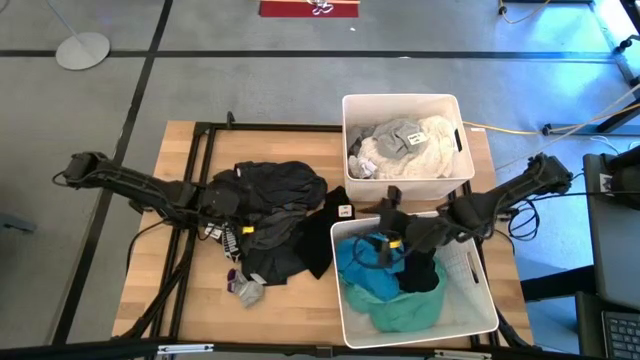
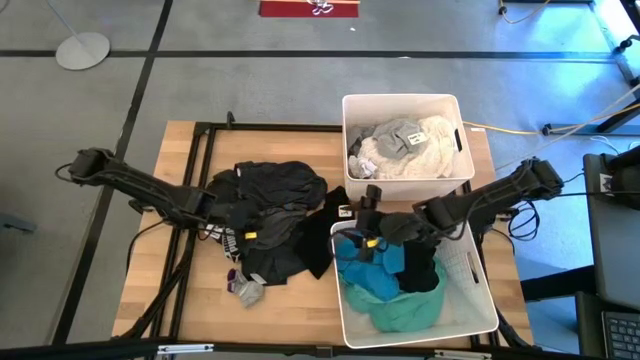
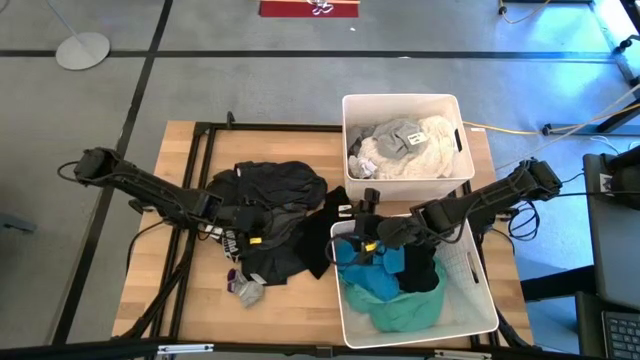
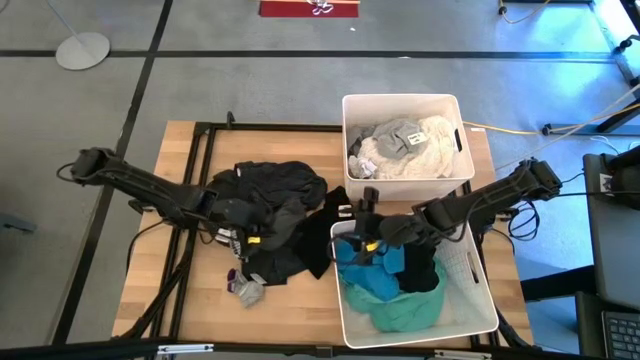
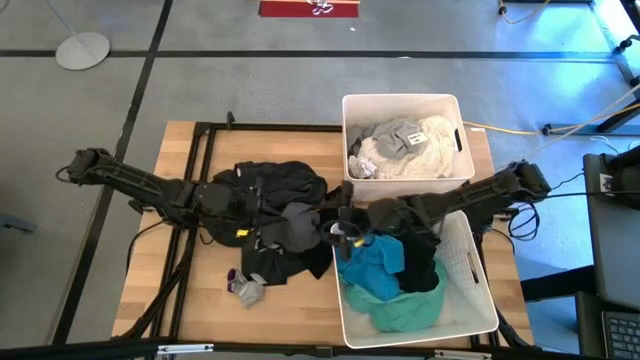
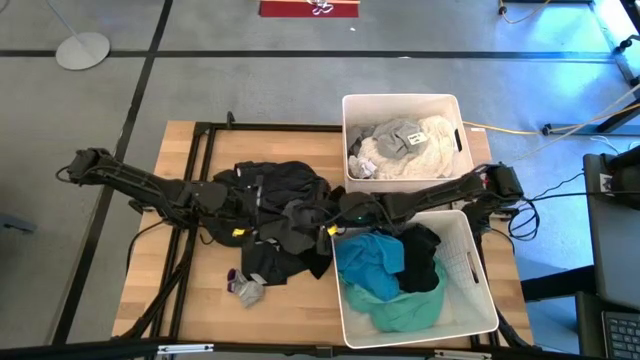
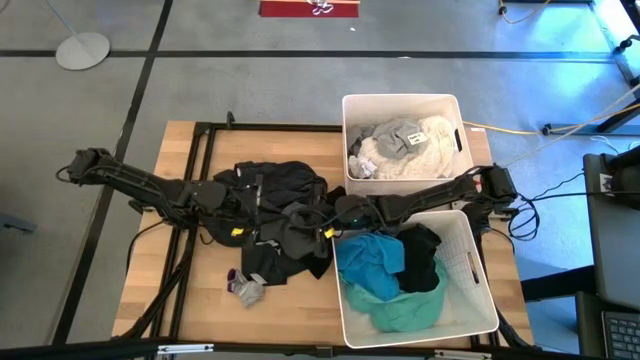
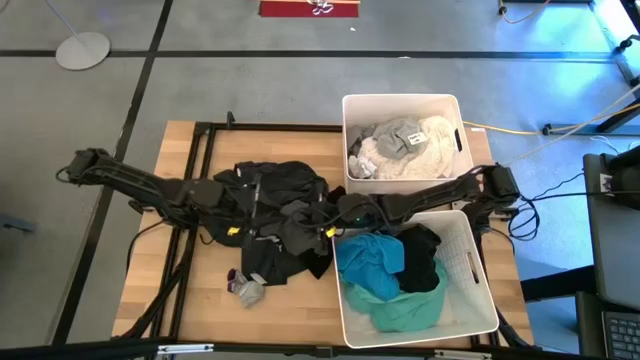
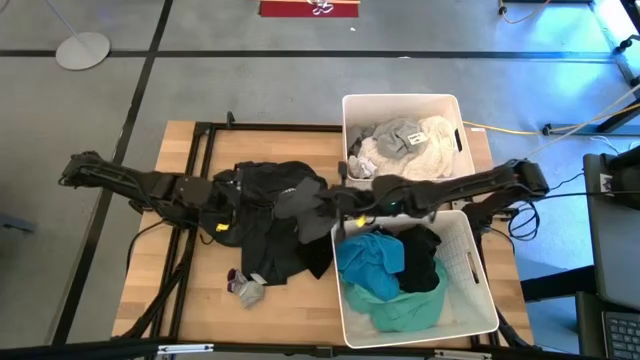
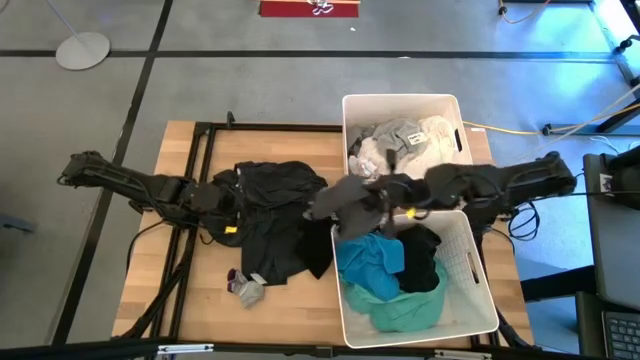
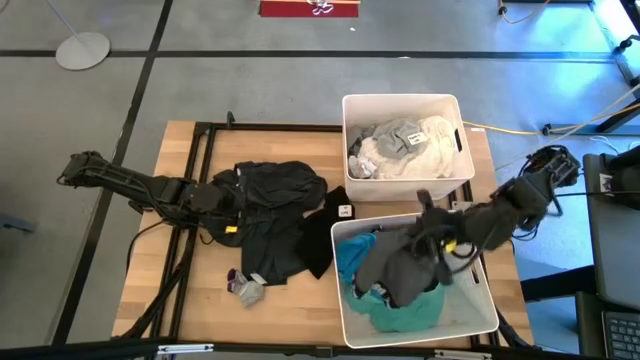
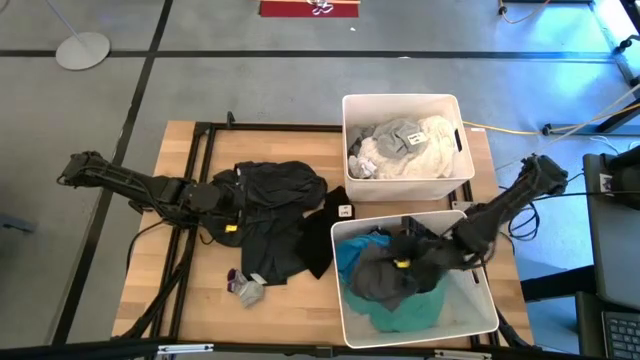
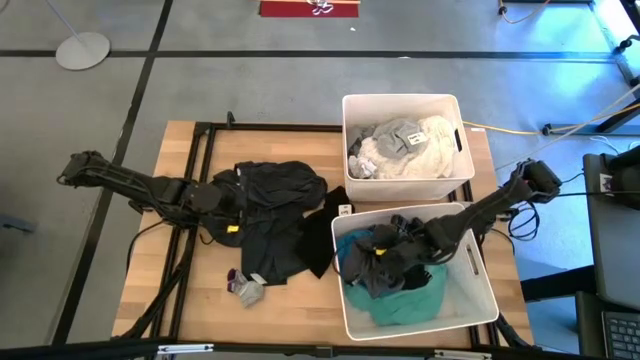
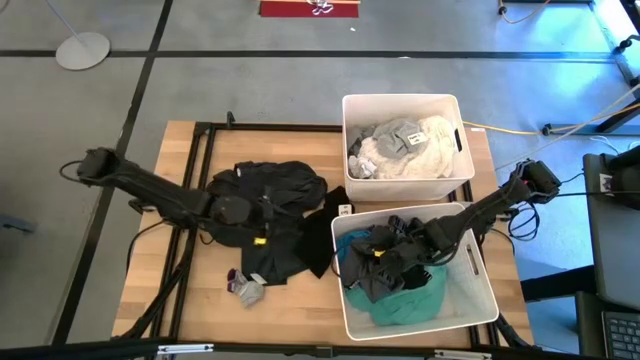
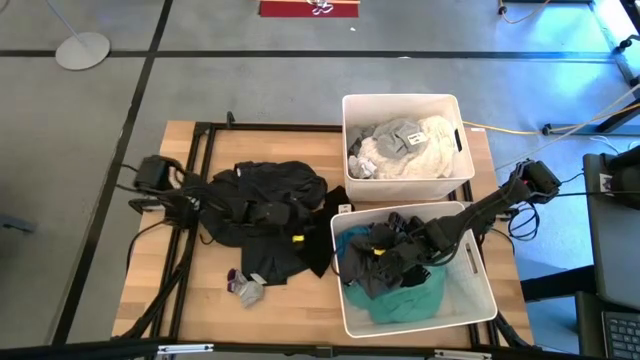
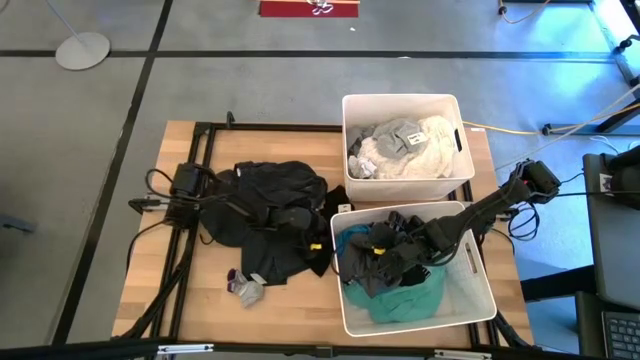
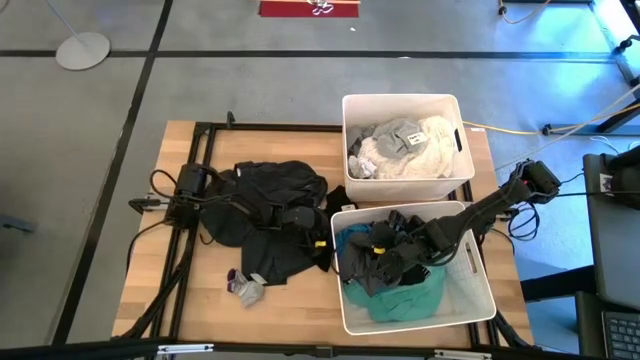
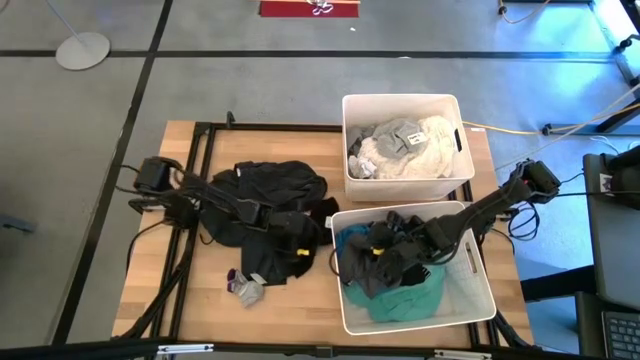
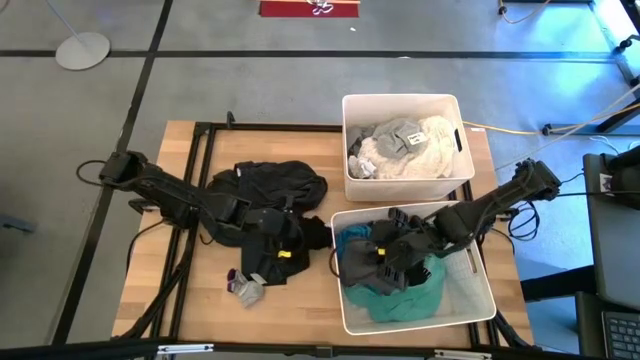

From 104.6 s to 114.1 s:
Task: Sort clothes
Put the gray underwear into the bottom white laundry bin

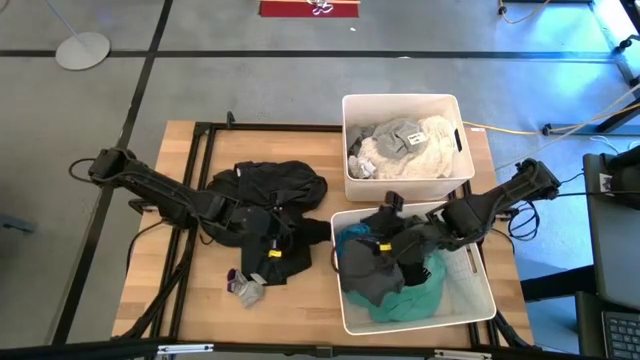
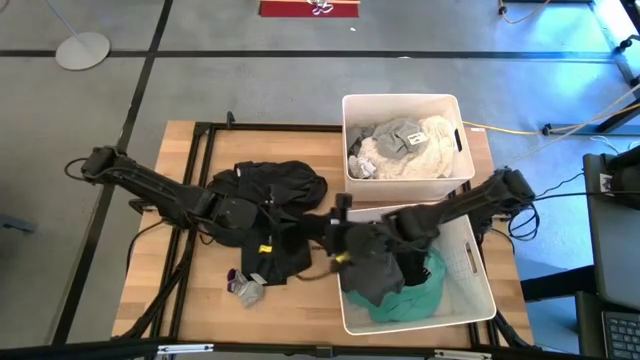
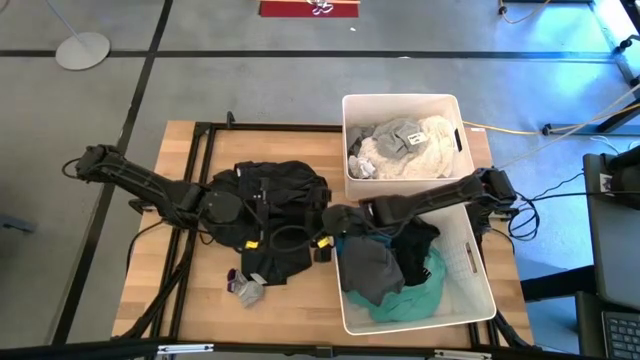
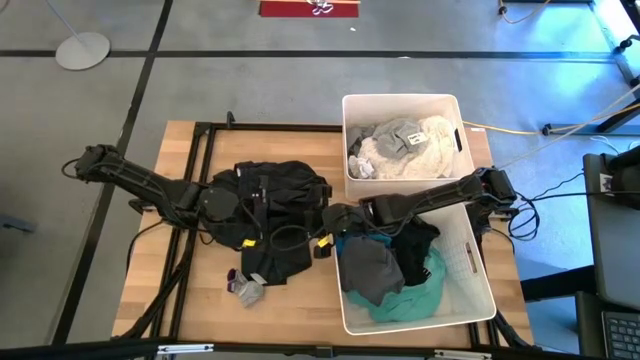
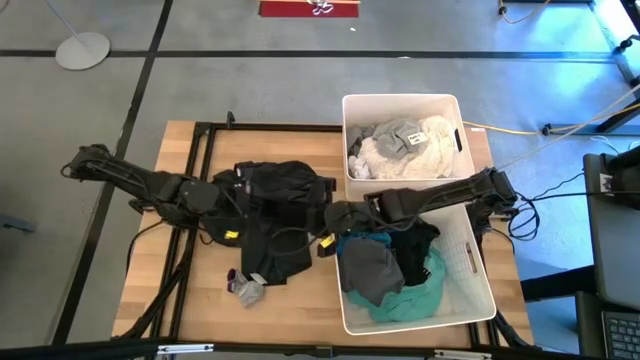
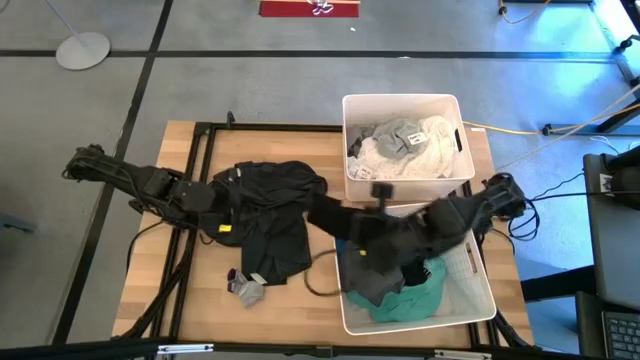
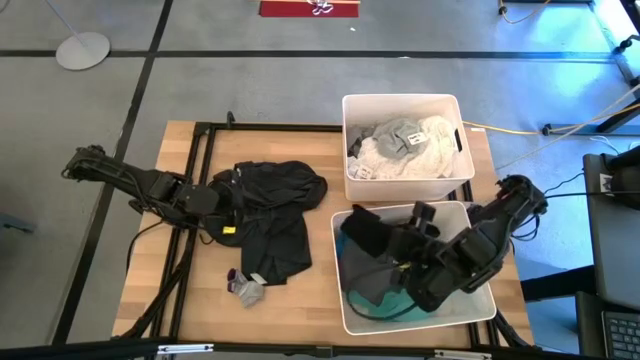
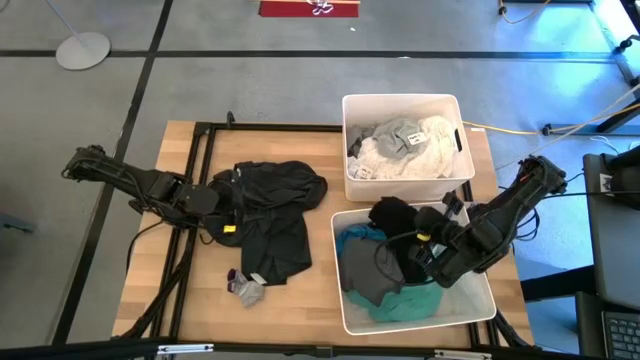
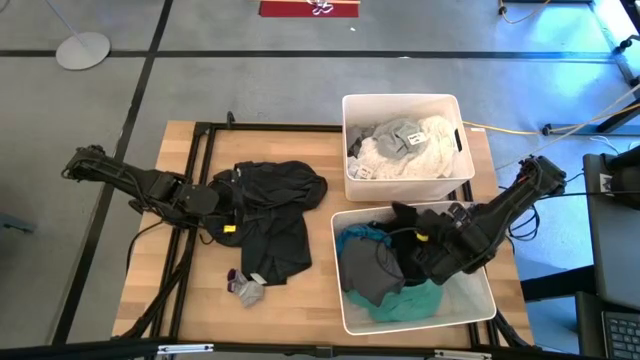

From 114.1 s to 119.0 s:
Put the black shirt into the bottom white laundry bin

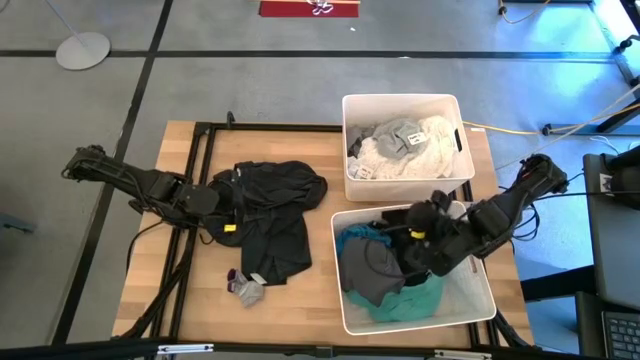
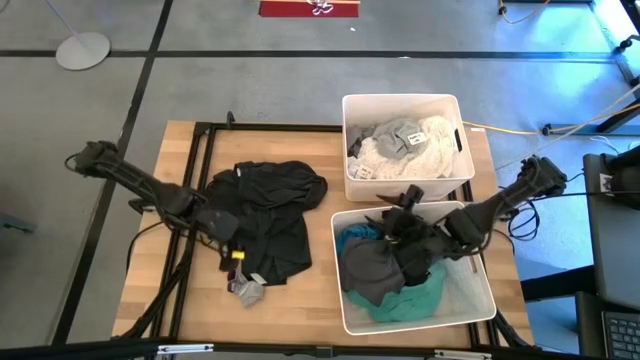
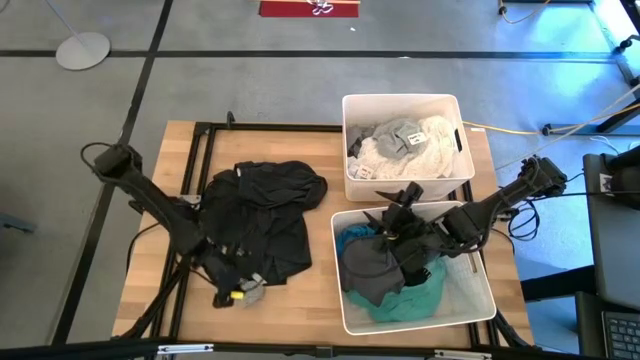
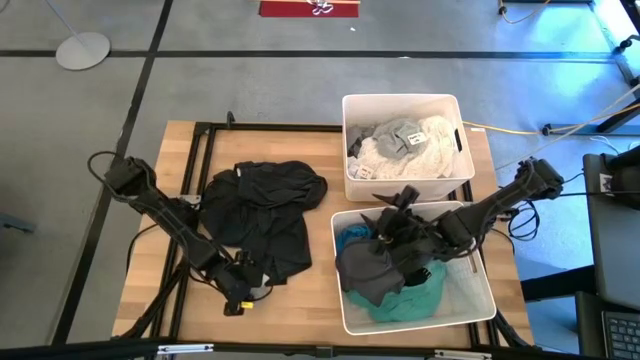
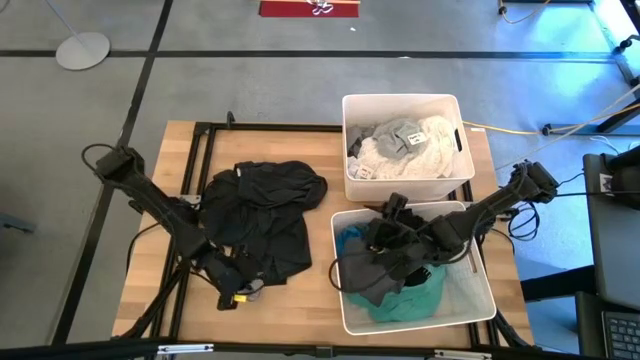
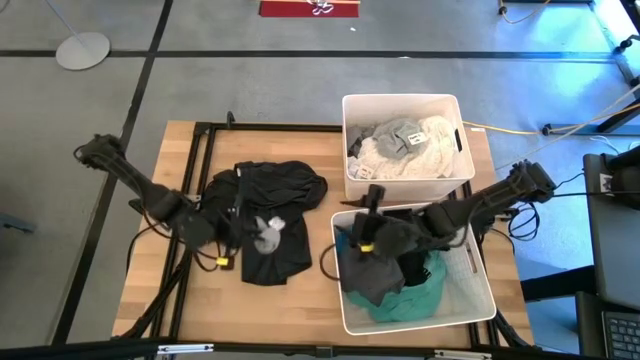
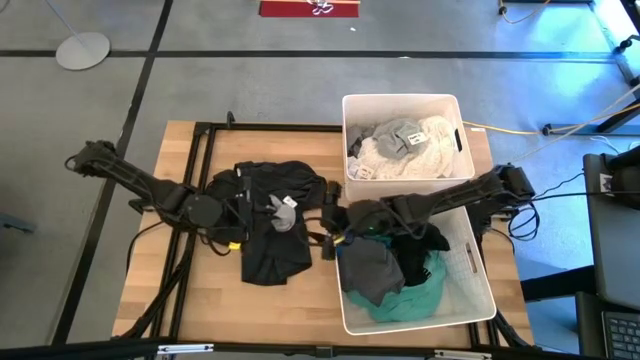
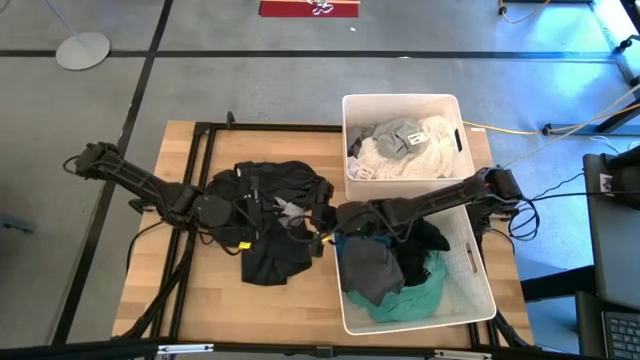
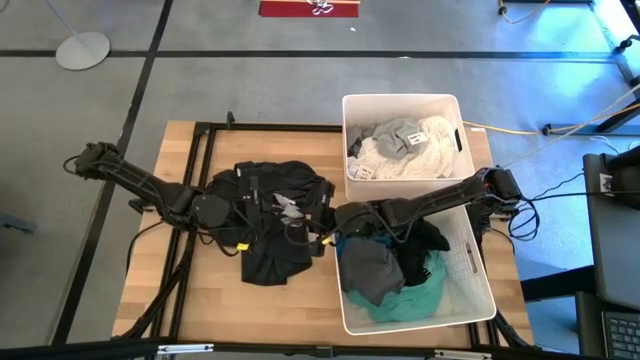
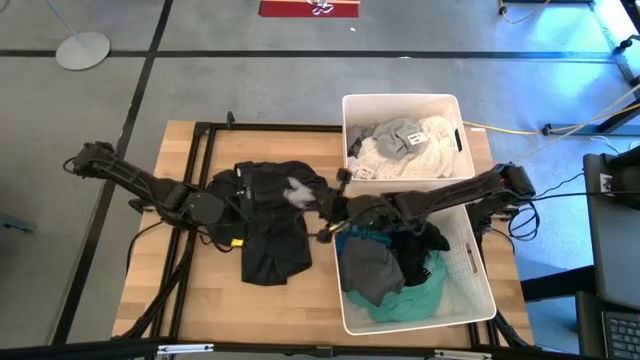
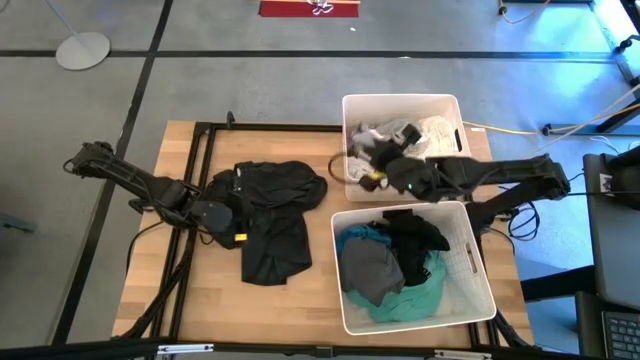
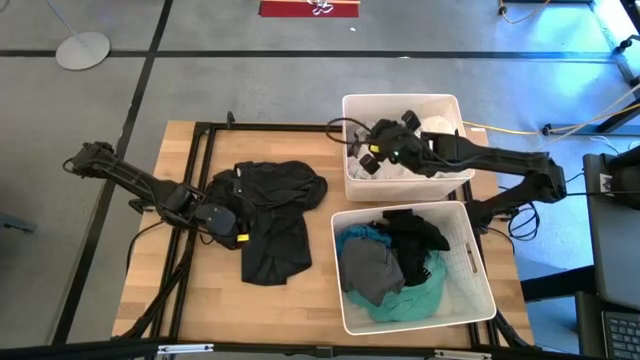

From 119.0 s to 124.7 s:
Put the gray sock into the top white laundry bin
